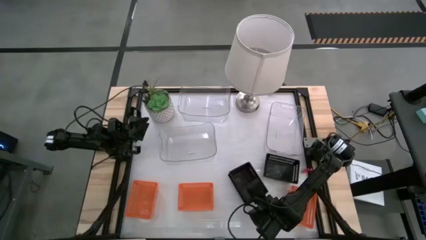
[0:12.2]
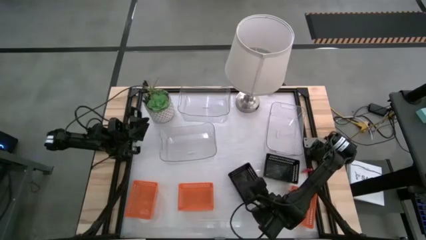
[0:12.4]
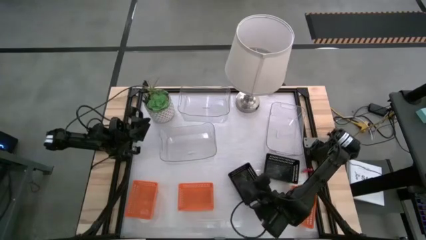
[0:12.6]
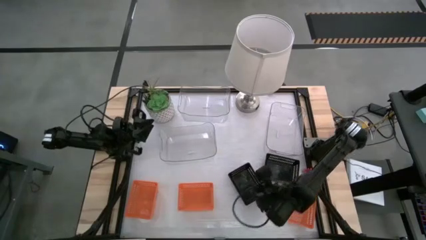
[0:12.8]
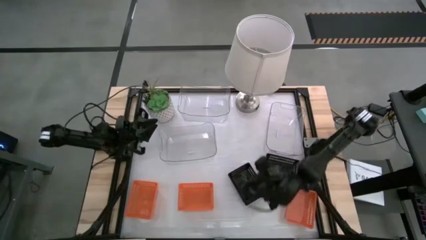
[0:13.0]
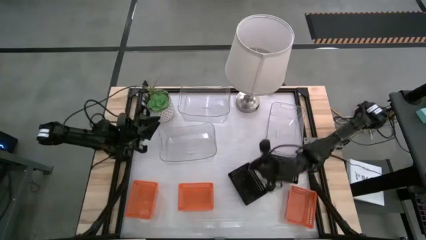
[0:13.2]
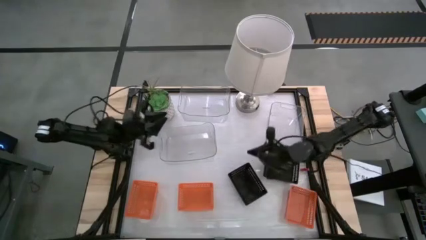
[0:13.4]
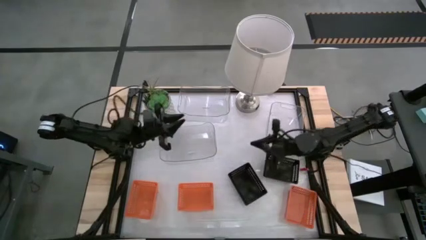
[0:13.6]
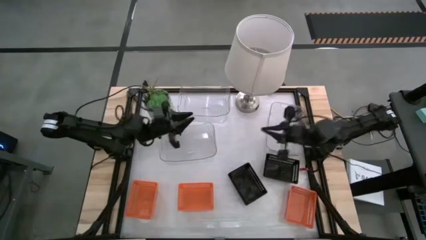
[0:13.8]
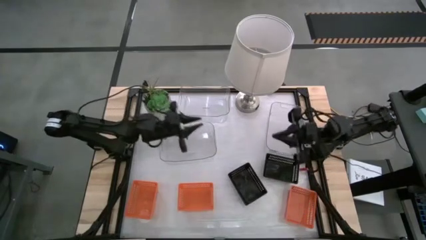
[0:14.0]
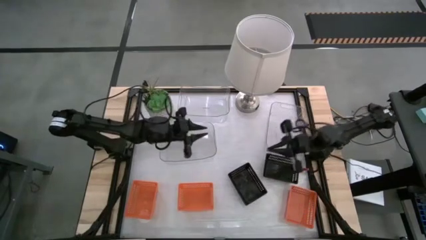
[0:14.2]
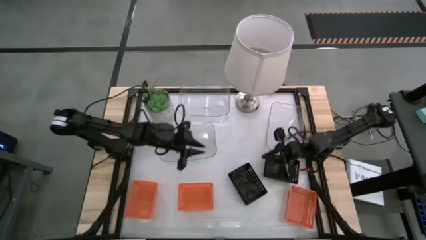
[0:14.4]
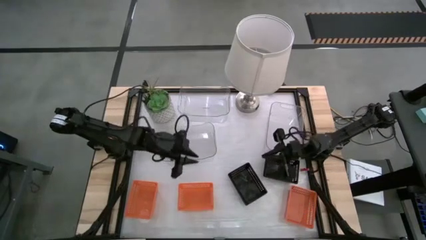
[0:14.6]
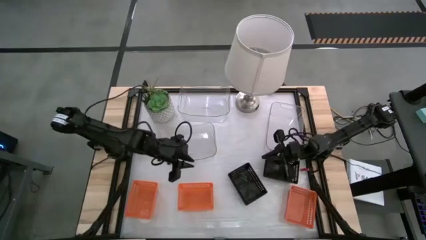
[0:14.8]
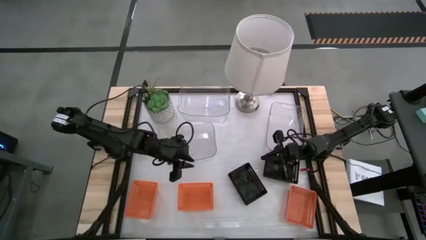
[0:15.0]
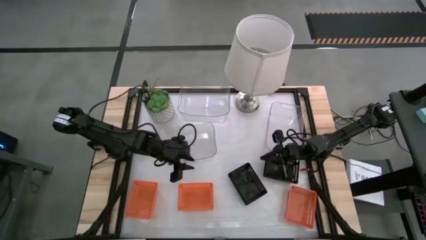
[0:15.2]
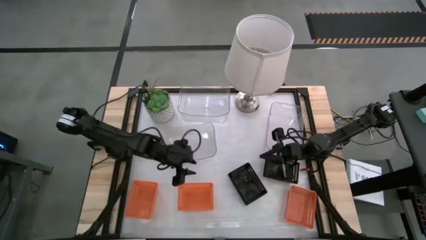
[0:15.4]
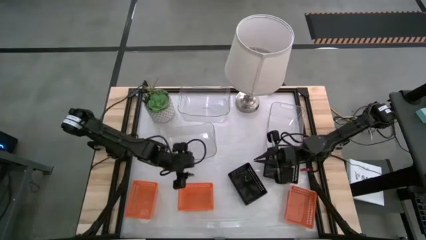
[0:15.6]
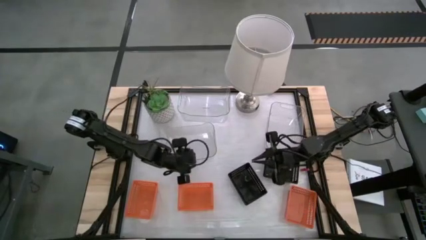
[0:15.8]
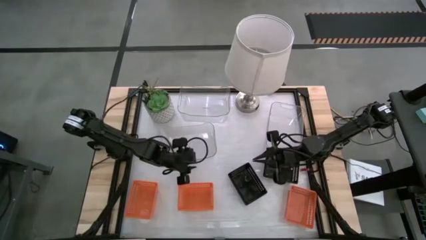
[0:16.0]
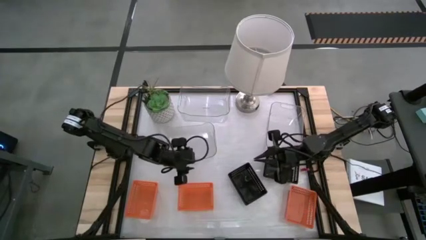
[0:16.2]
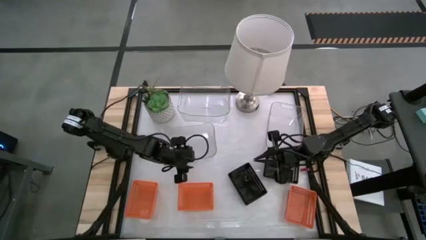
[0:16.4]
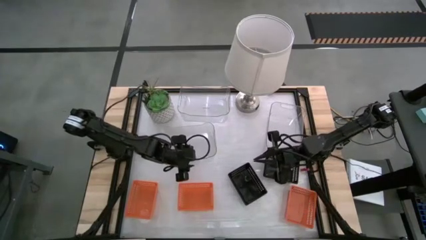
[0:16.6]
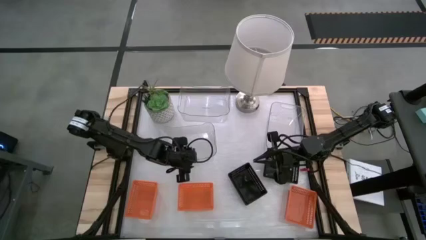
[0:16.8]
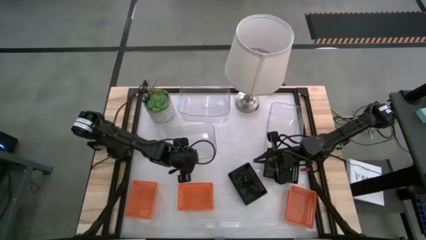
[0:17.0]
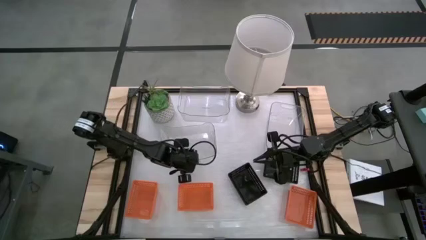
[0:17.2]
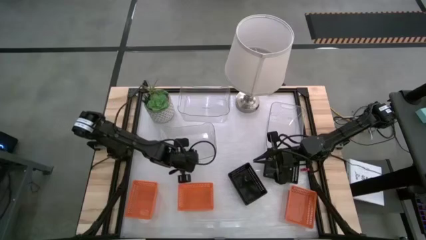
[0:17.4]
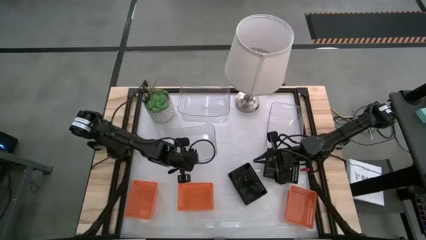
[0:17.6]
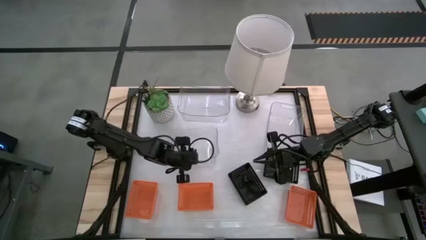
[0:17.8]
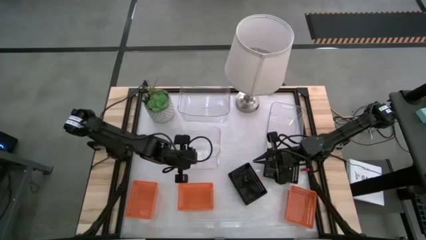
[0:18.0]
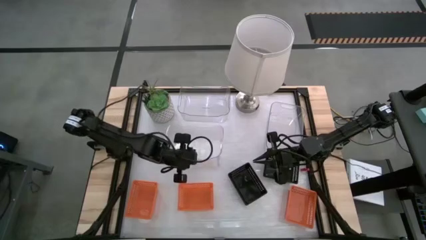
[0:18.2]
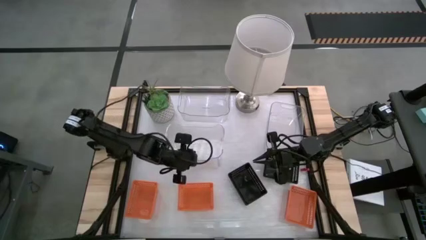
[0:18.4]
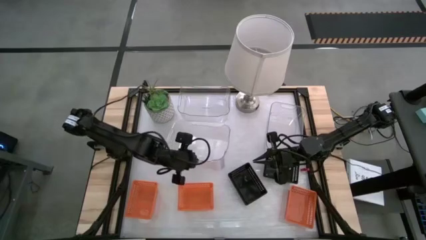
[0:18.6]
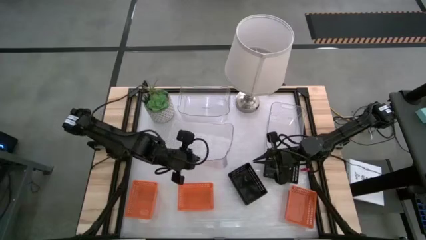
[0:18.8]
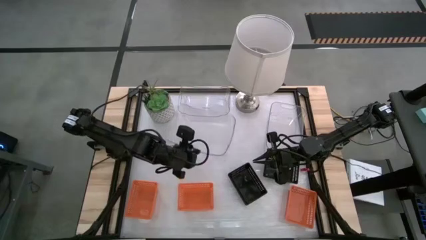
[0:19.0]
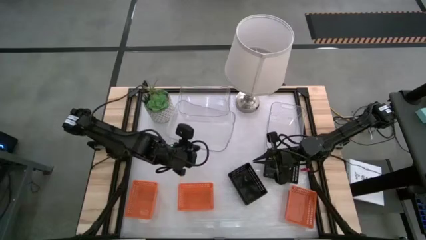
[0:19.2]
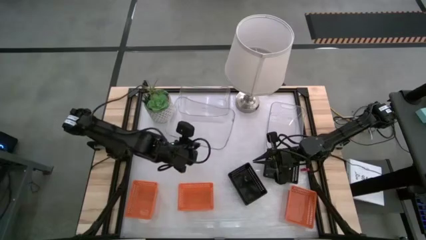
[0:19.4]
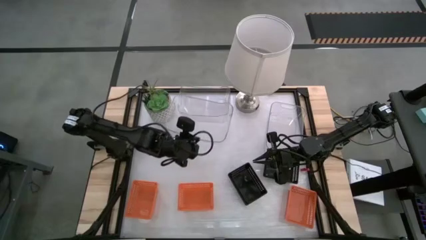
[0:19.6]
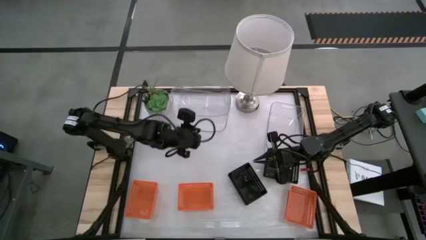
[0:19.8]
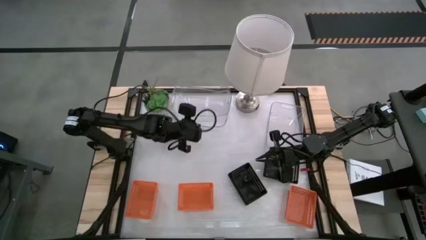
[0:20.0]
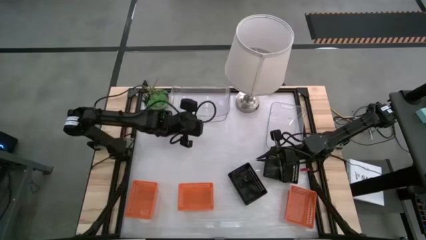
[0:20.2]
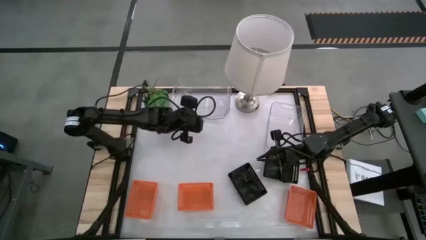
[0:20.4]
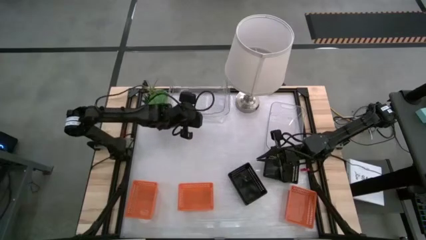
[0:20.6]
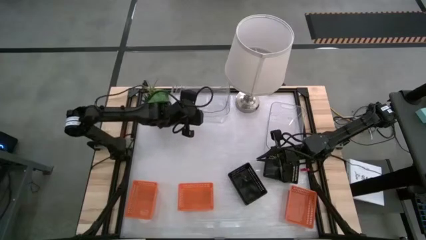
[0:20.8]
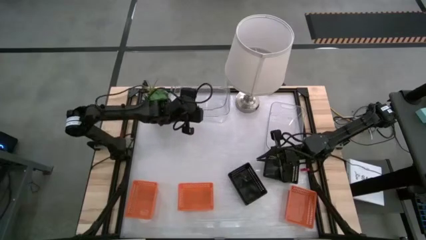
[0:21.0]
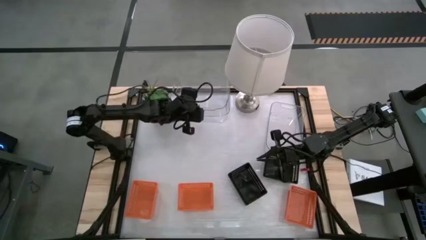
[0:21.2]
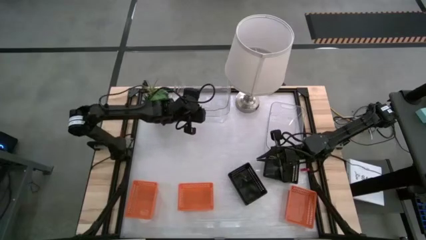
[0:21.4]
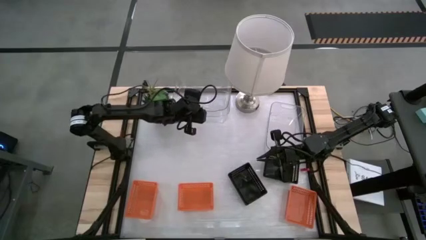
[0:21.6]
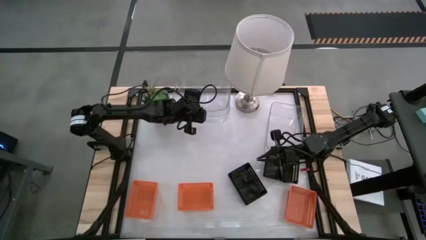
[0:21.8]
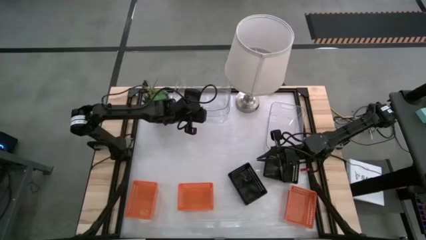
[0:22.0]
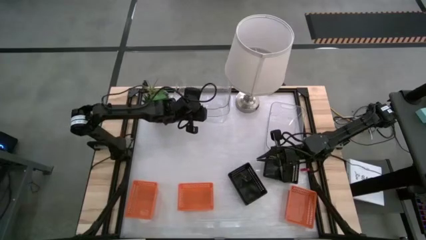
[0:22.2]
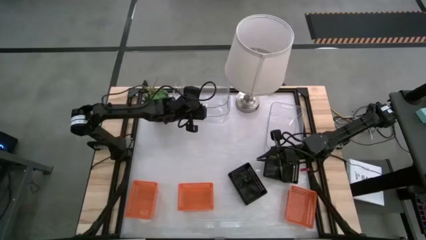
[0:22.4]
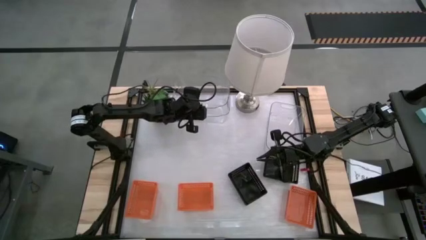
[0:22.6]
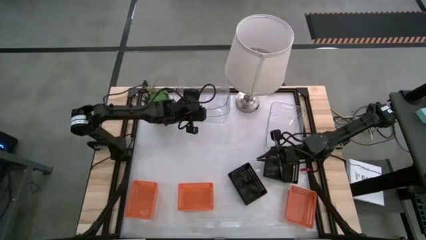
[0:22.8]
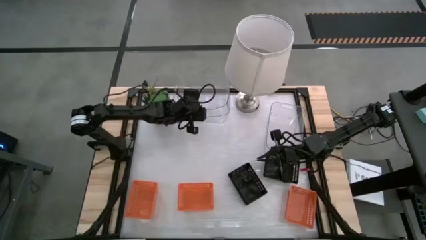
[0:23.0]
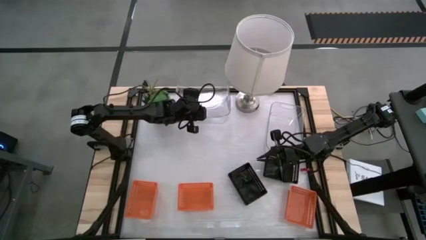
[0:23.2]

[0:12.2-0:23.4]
Stack the bottom left transparent bin on the top transparent bin
